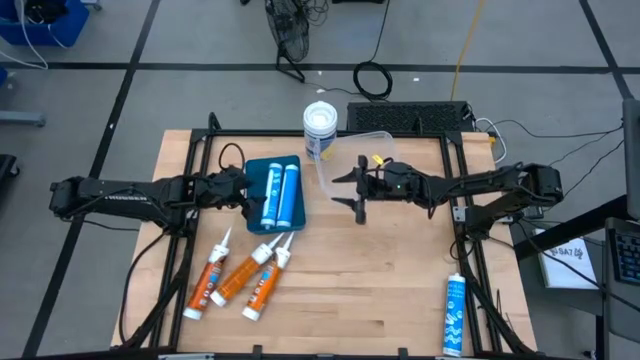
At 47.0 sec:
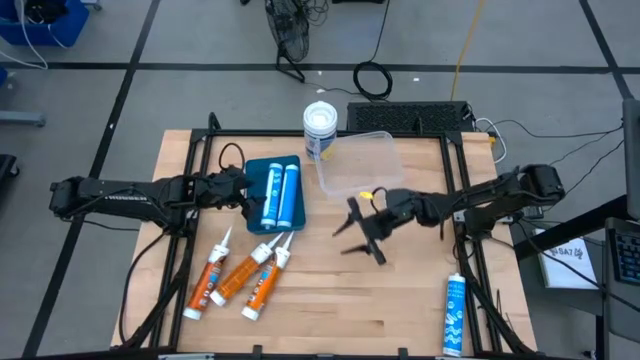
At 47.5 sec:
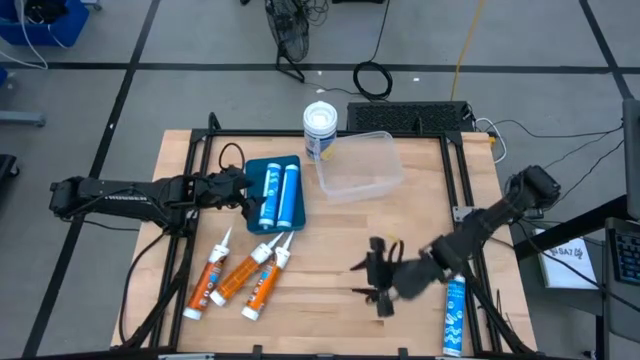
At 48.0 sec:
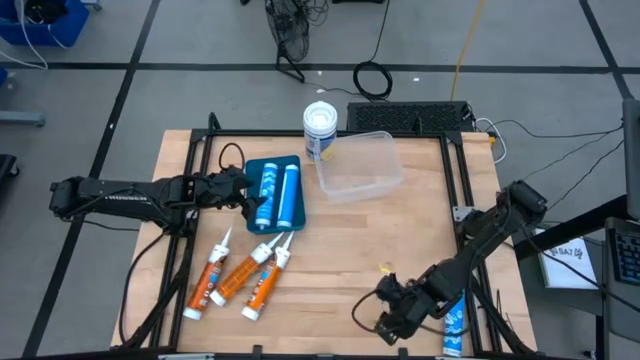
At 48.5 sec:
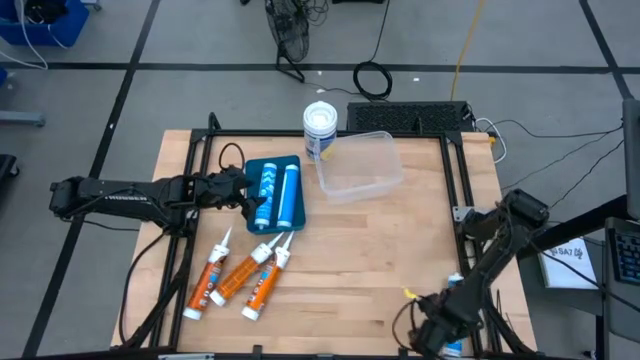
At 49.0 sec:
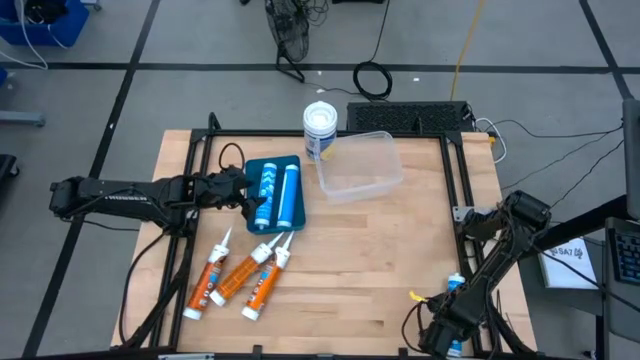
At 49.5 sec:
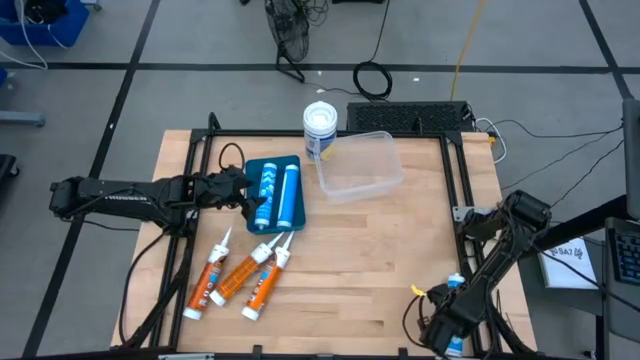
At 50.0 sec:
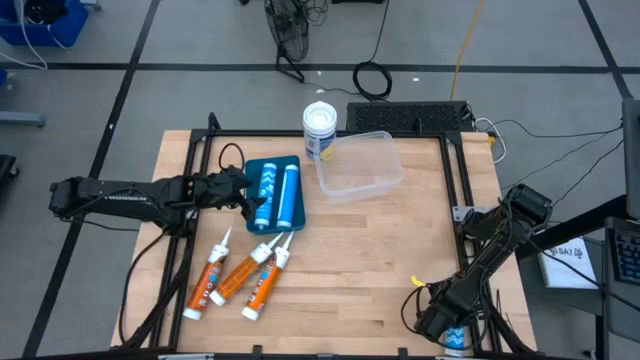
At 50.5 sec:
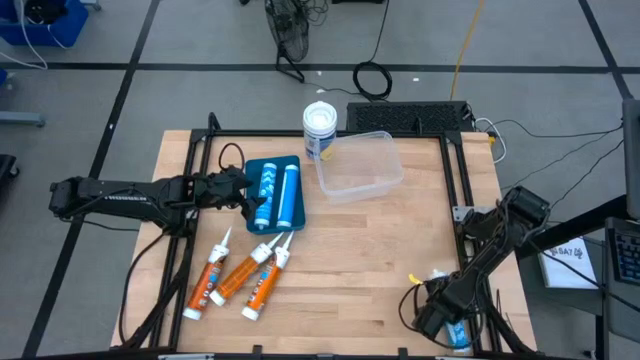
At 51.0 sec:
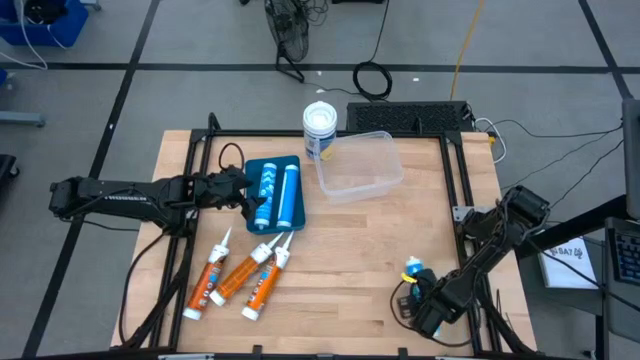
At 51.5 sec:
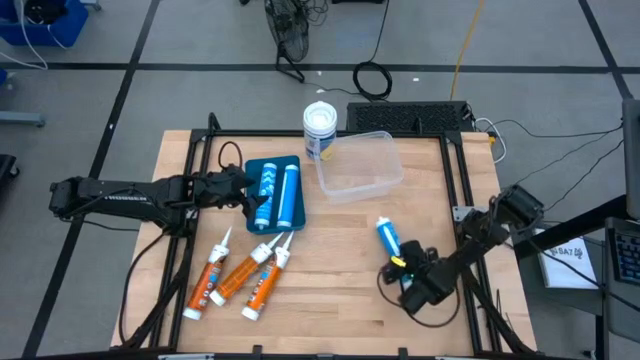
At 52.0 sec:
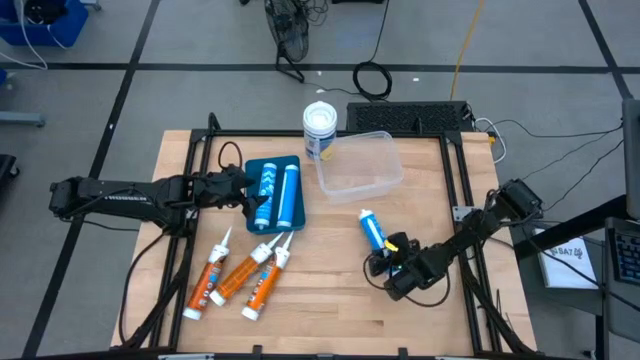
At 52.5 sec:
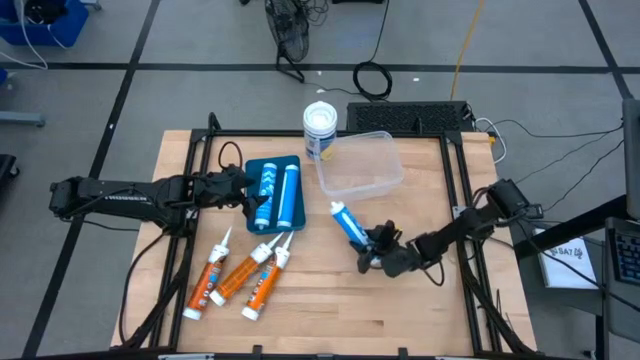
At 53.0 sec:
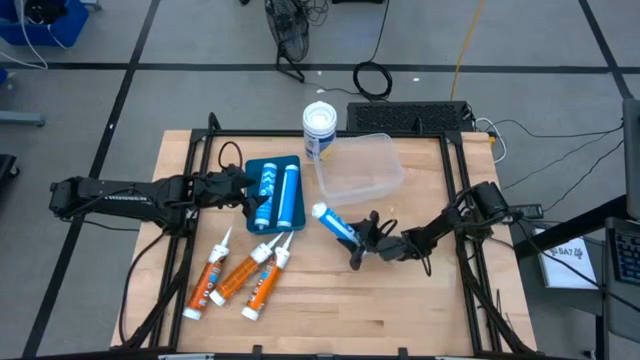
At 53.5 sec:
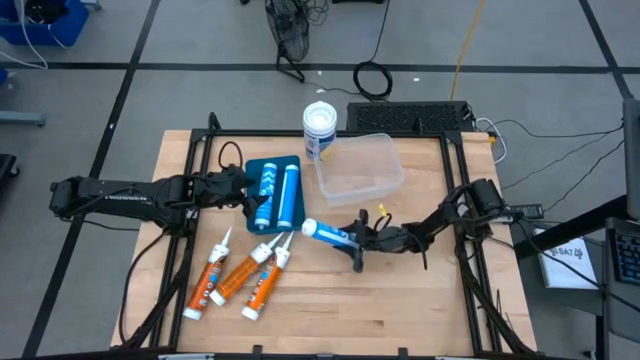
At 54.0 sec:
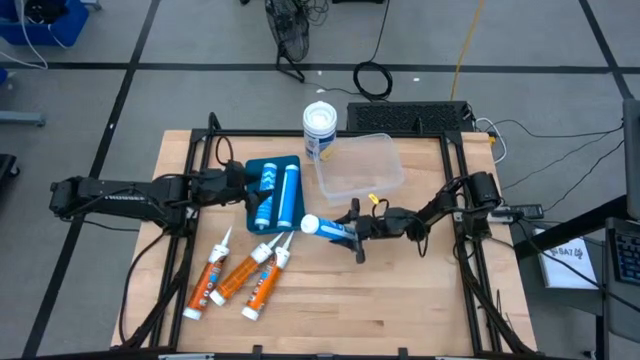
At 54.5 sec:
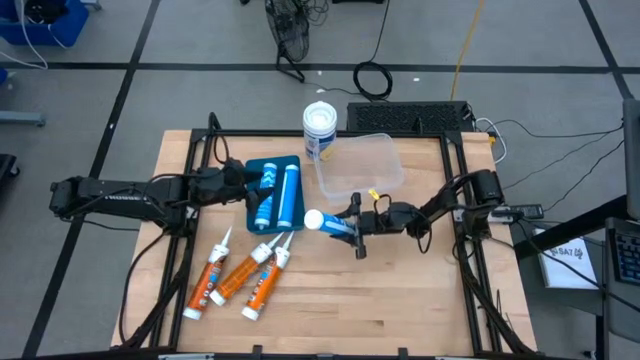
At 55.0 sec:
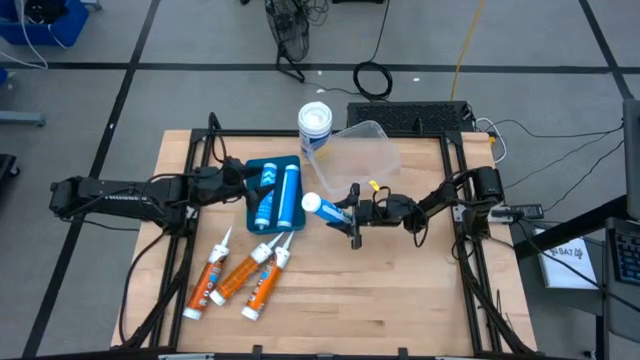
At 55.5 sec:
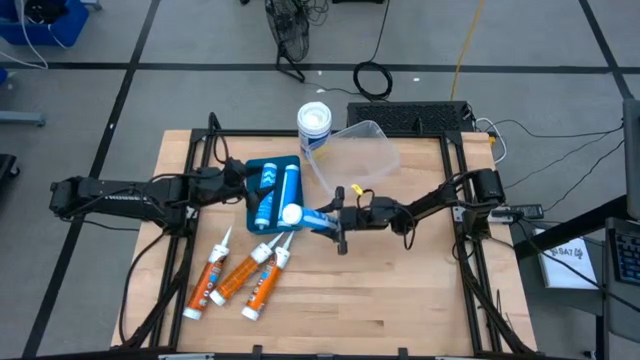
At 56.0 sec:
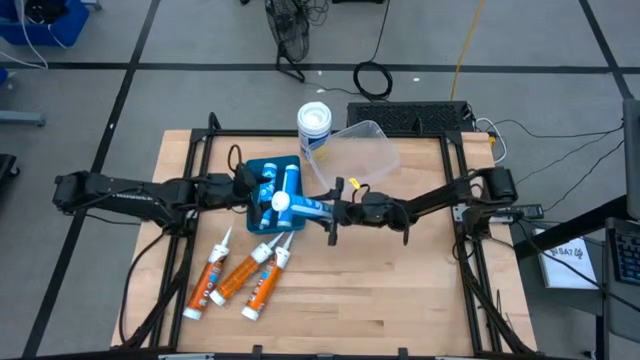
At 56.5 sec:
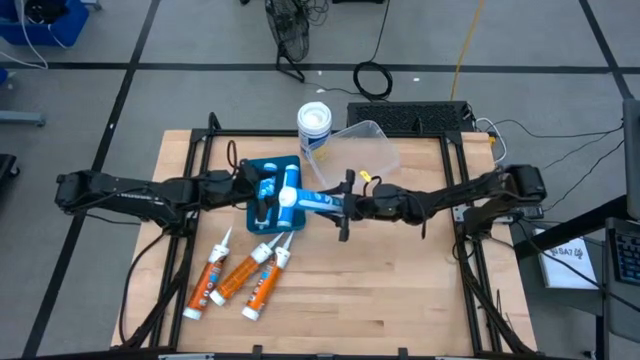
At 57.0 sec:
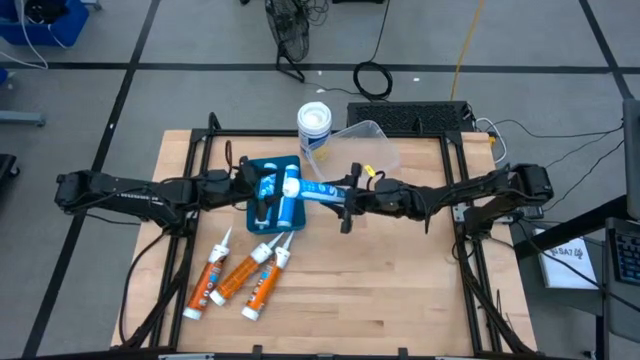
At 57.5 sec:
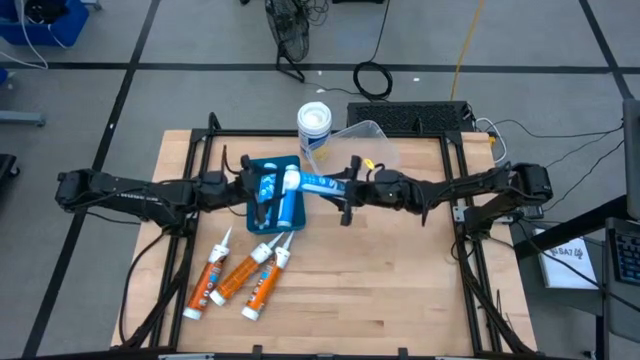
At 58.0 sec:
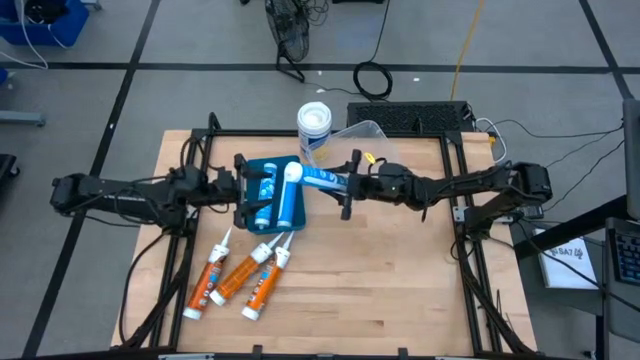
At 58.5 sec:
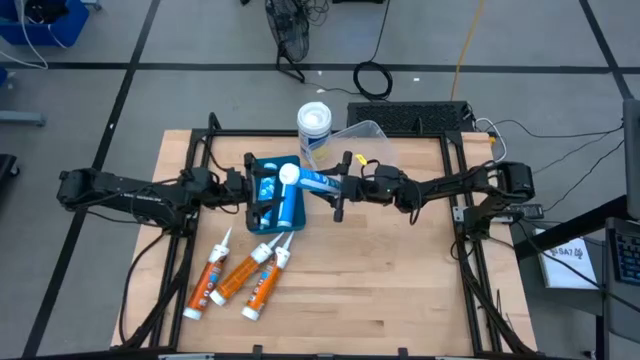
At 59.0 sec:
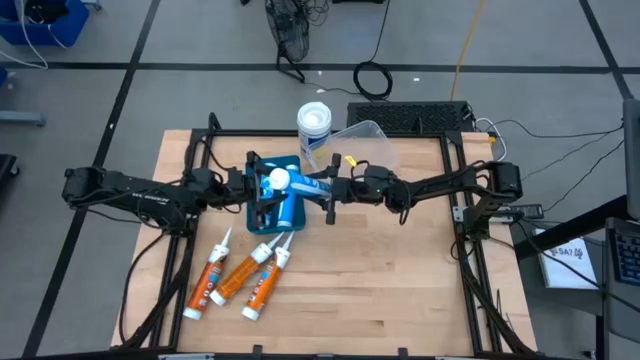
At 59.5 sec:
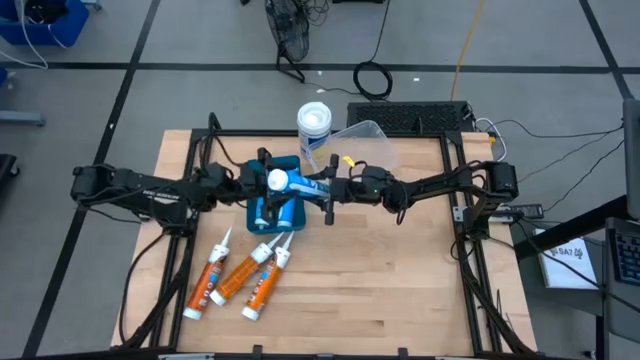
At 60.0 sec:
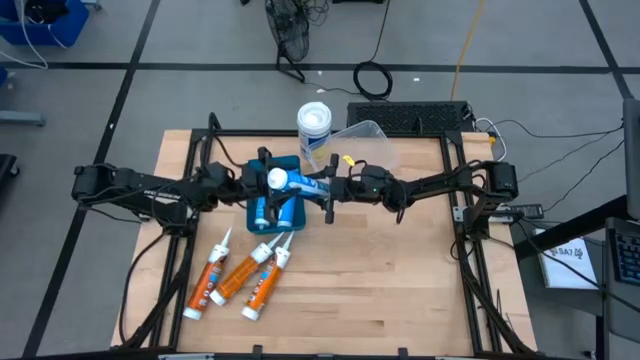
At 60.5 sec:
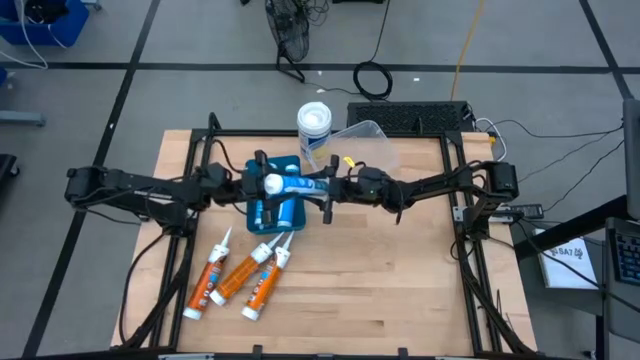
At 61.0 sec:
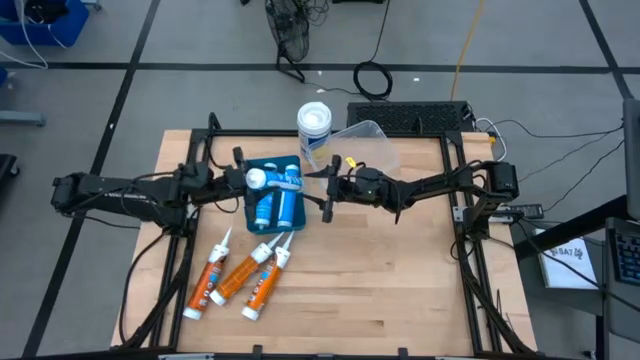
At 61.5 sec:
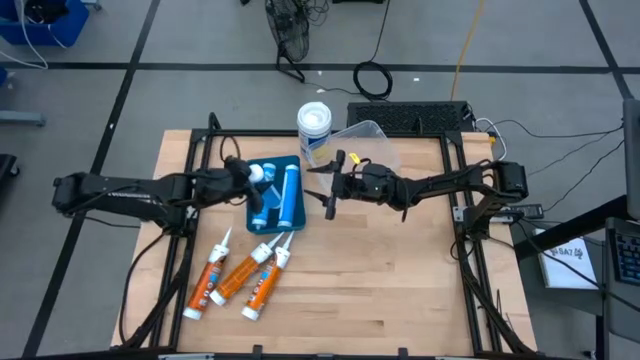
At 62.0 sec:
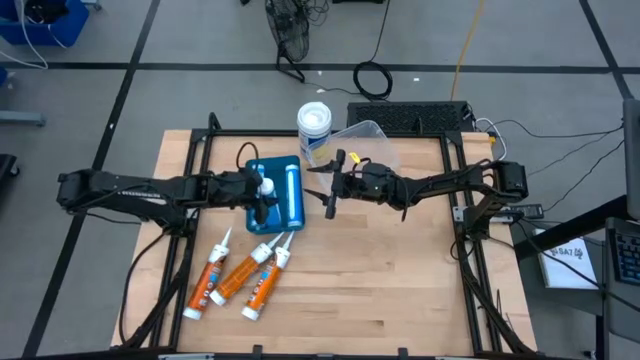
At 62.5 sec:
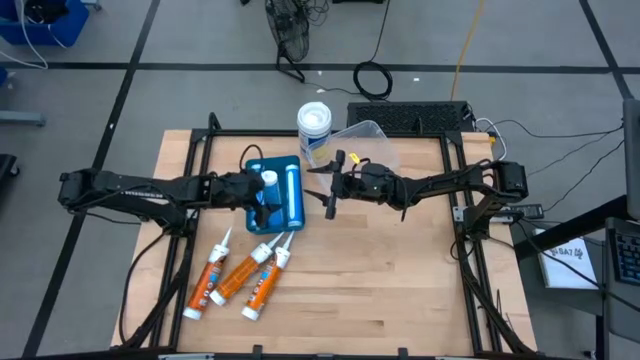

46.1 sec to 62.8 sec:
Task: Pick & place silicon tubes, Sealant and Lysol wipes
Put the blue caulk tube into the blue bin

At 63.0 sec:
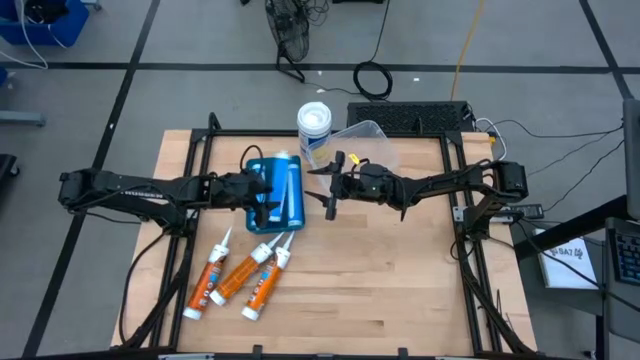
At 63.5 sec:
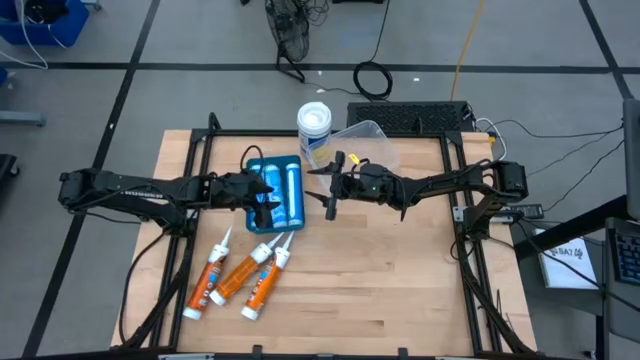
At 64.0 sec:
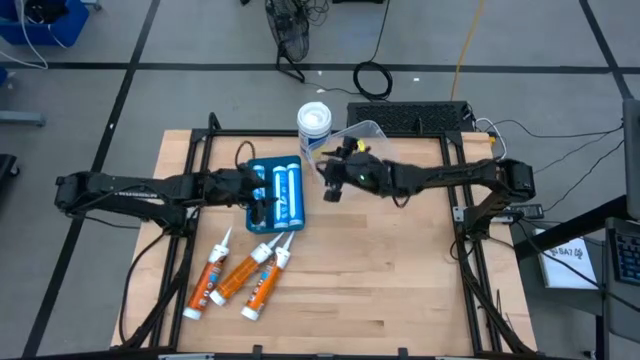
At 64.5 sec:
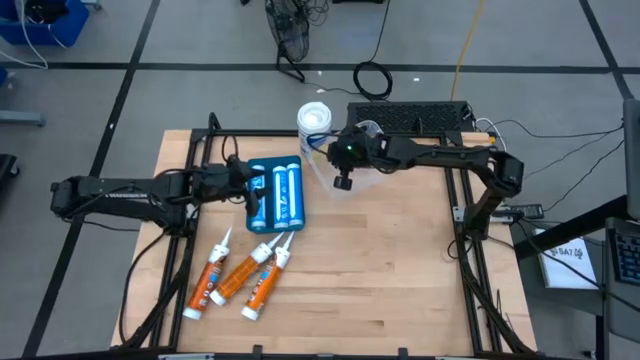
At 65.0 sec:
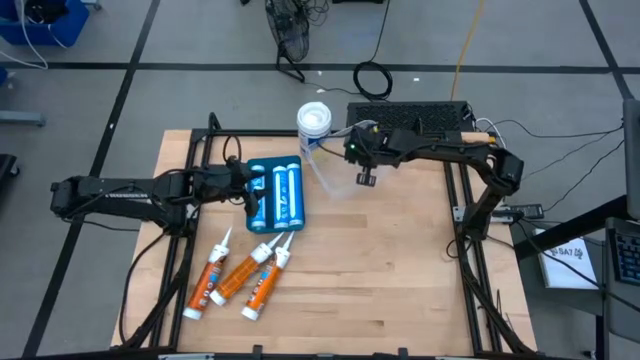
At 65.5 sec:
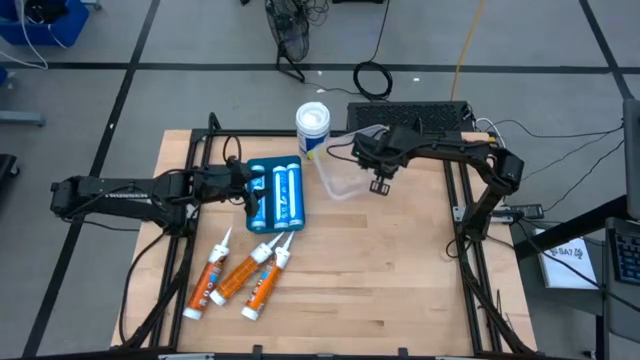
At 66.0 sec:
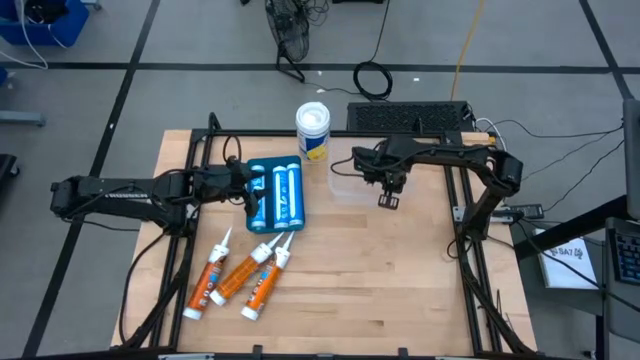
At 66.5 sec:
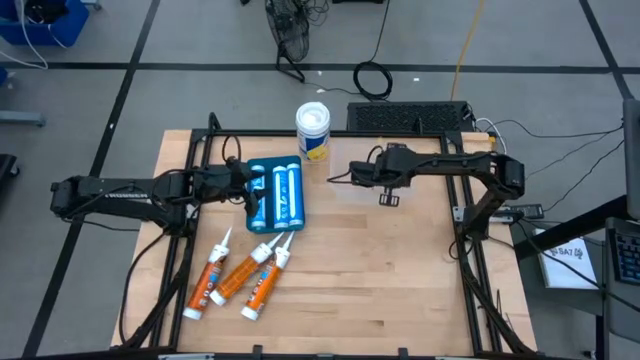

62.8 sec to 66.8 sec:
Adjust the transparent bin
